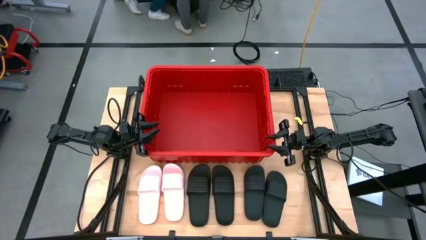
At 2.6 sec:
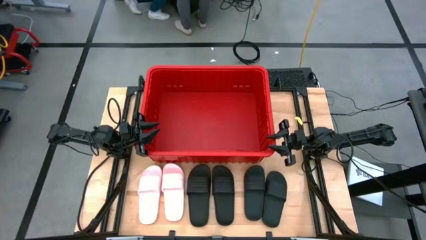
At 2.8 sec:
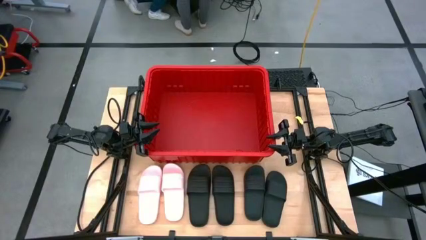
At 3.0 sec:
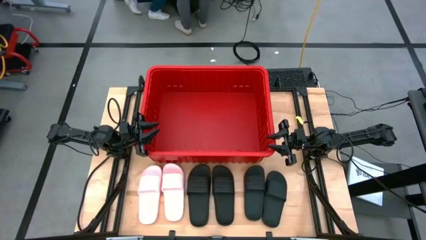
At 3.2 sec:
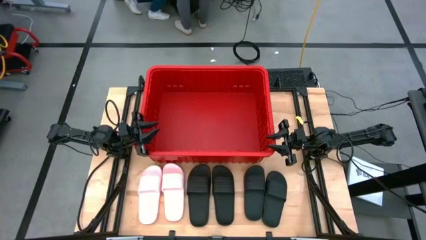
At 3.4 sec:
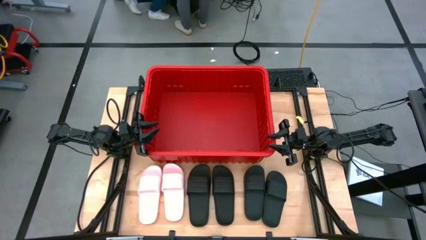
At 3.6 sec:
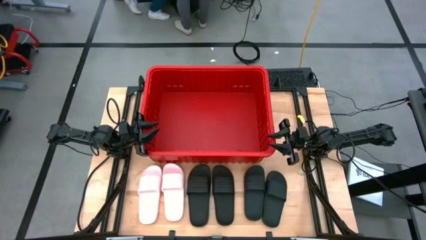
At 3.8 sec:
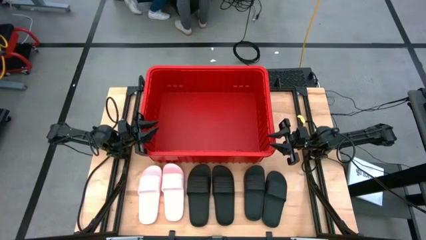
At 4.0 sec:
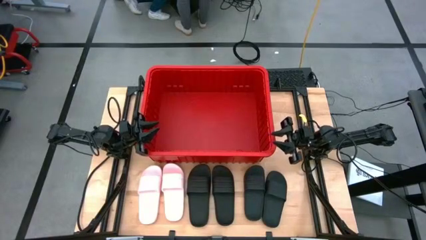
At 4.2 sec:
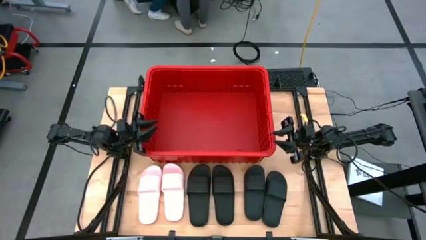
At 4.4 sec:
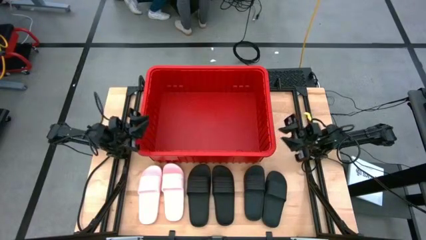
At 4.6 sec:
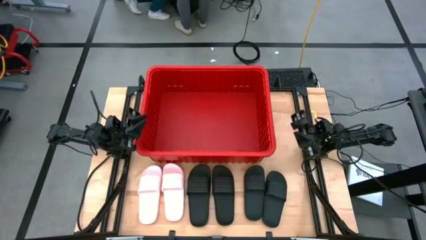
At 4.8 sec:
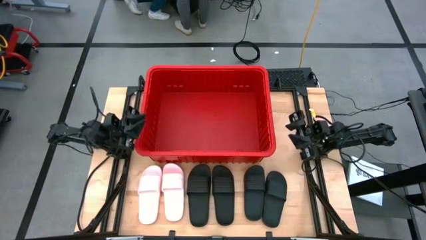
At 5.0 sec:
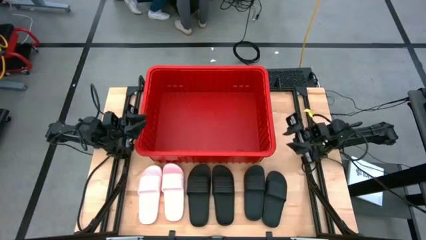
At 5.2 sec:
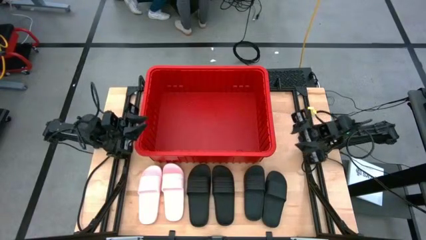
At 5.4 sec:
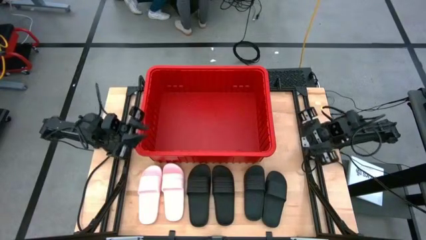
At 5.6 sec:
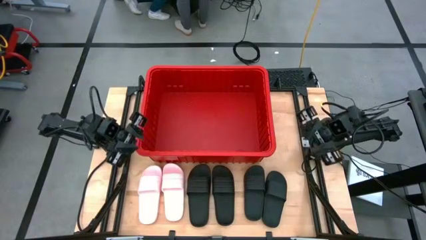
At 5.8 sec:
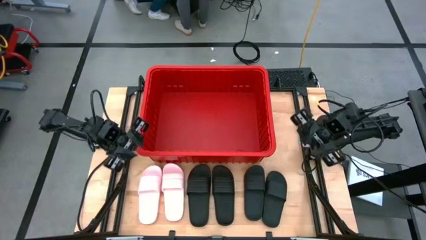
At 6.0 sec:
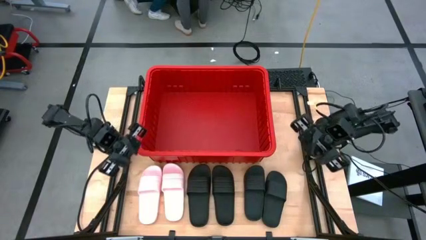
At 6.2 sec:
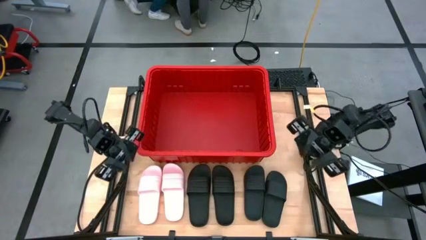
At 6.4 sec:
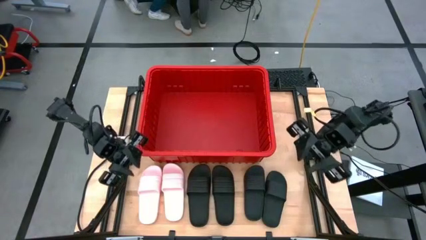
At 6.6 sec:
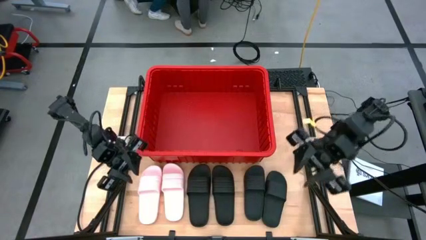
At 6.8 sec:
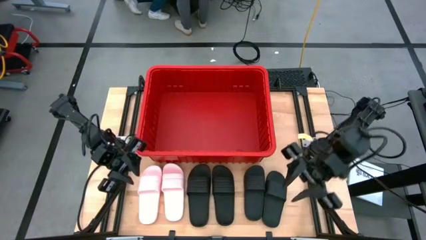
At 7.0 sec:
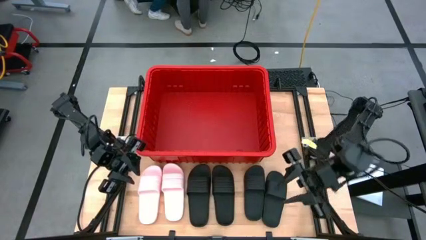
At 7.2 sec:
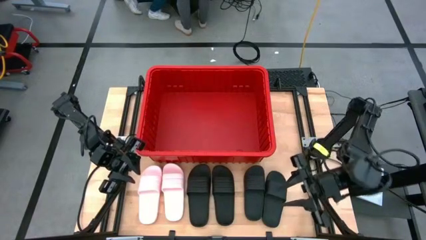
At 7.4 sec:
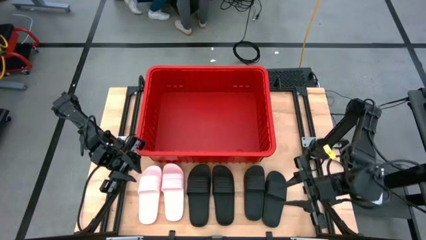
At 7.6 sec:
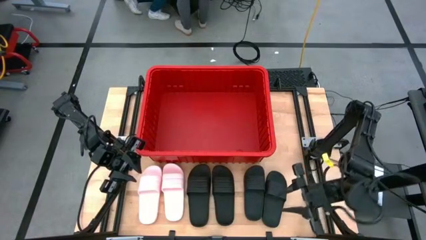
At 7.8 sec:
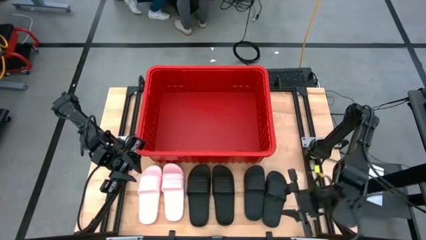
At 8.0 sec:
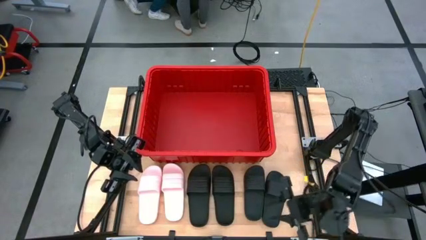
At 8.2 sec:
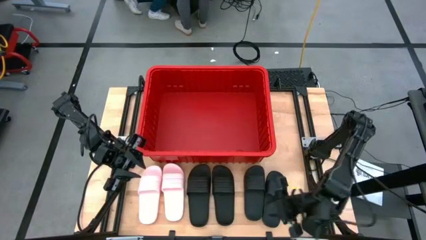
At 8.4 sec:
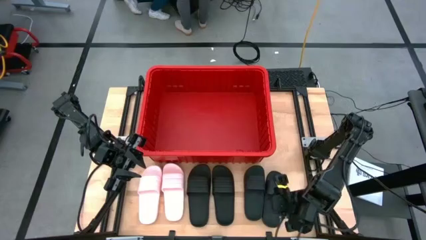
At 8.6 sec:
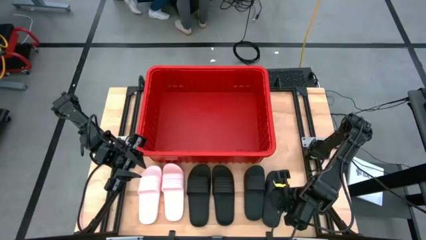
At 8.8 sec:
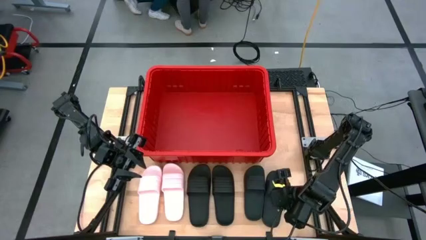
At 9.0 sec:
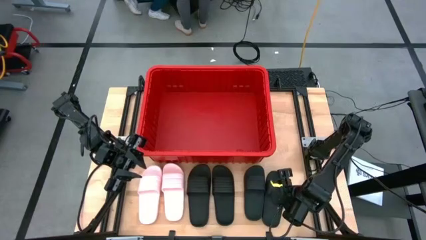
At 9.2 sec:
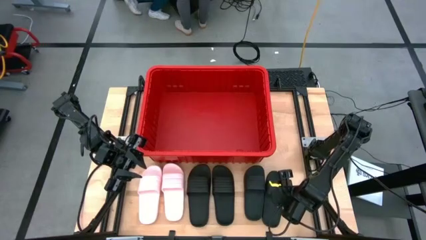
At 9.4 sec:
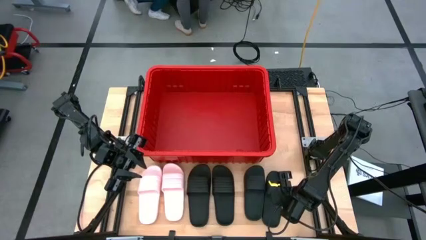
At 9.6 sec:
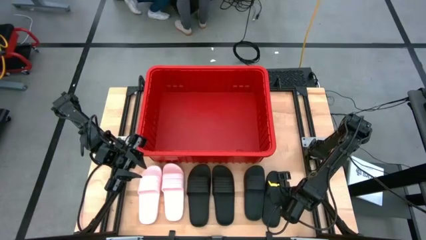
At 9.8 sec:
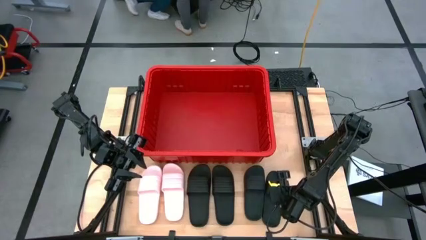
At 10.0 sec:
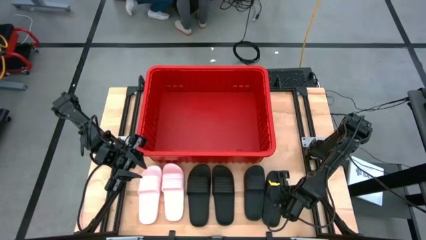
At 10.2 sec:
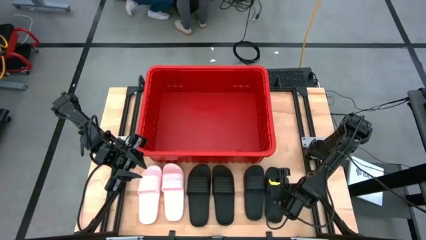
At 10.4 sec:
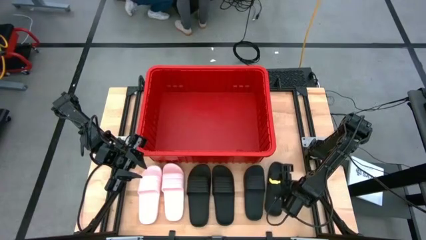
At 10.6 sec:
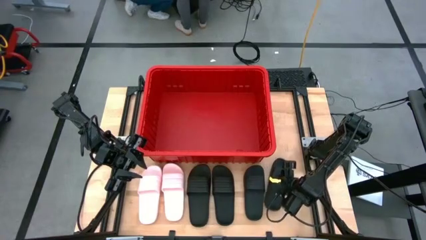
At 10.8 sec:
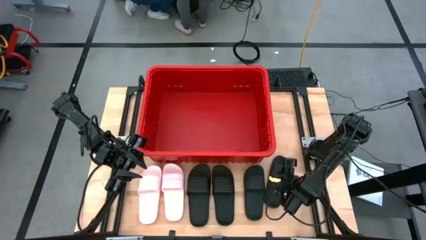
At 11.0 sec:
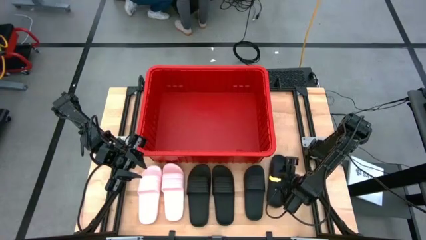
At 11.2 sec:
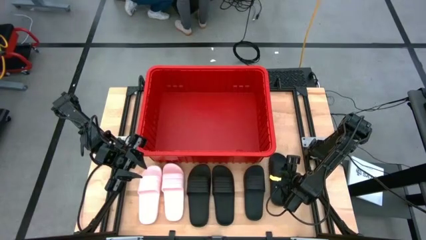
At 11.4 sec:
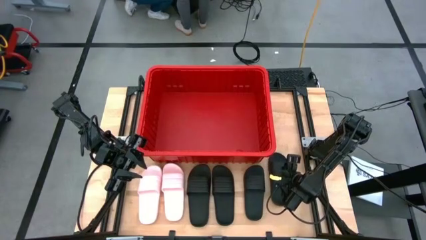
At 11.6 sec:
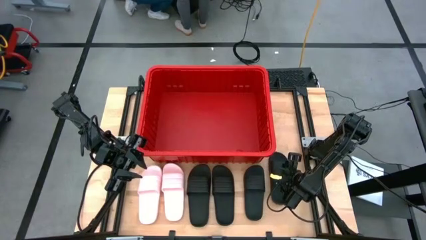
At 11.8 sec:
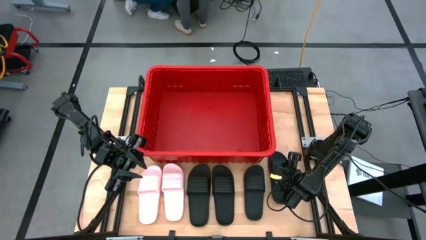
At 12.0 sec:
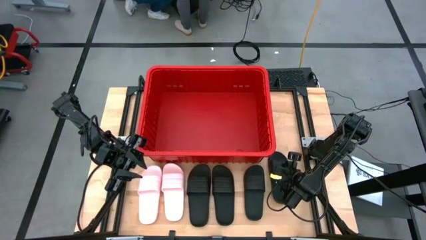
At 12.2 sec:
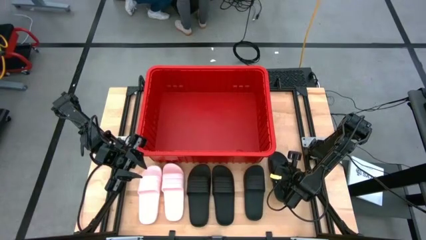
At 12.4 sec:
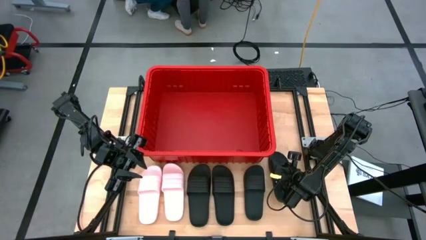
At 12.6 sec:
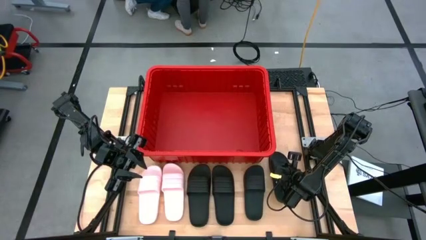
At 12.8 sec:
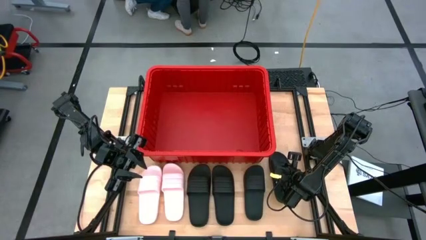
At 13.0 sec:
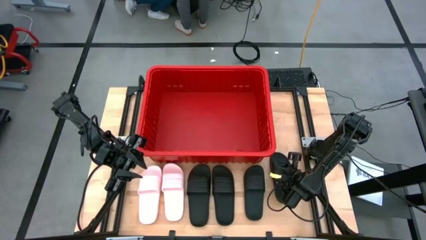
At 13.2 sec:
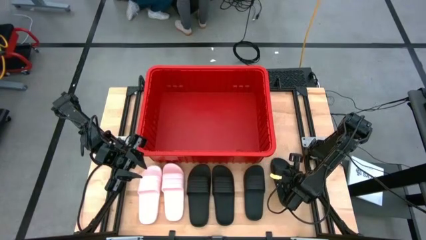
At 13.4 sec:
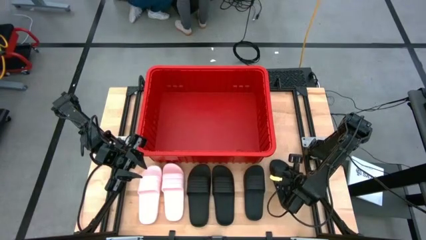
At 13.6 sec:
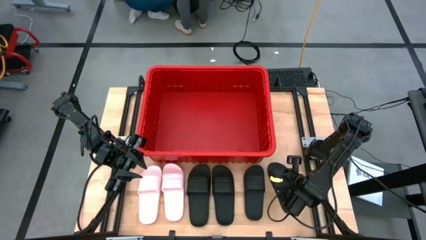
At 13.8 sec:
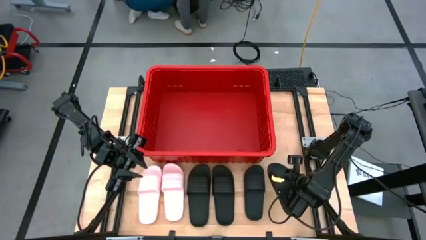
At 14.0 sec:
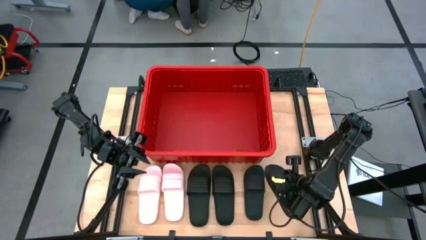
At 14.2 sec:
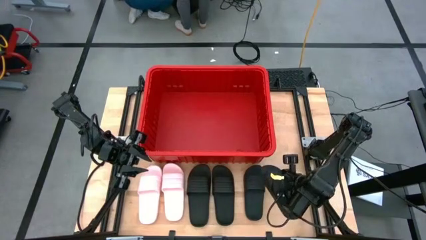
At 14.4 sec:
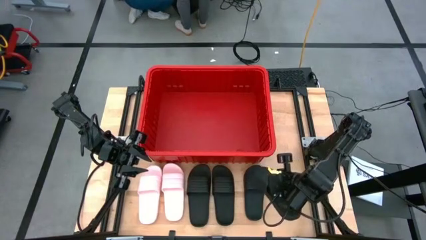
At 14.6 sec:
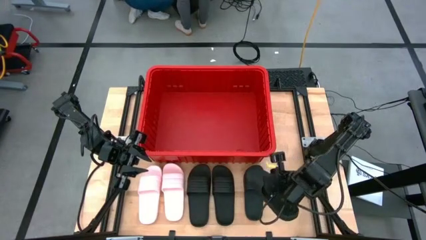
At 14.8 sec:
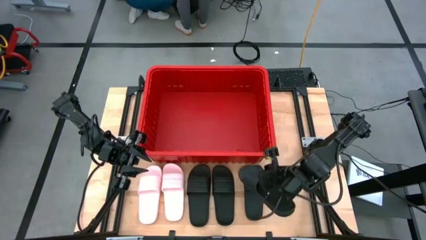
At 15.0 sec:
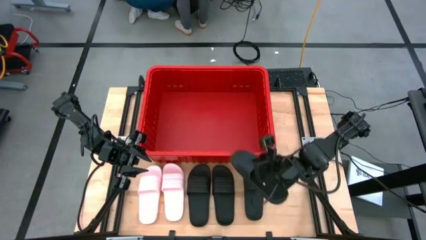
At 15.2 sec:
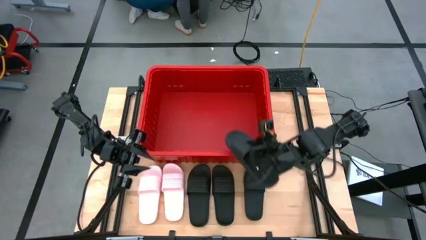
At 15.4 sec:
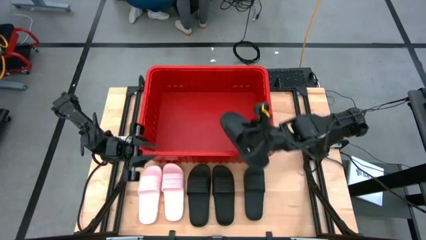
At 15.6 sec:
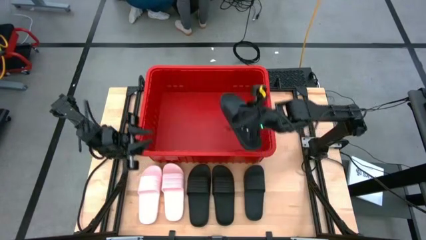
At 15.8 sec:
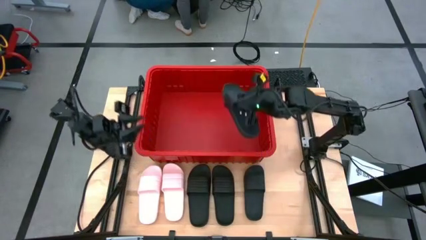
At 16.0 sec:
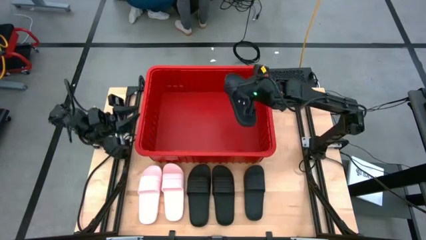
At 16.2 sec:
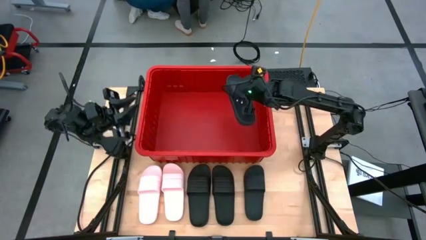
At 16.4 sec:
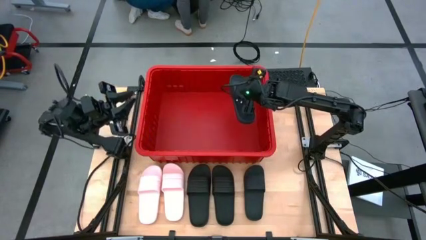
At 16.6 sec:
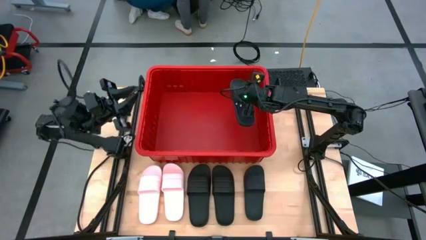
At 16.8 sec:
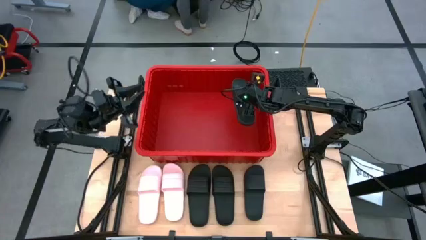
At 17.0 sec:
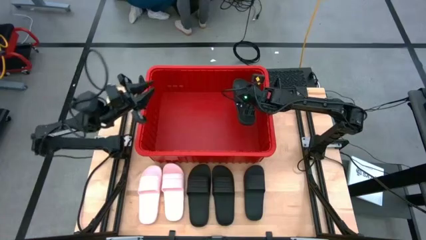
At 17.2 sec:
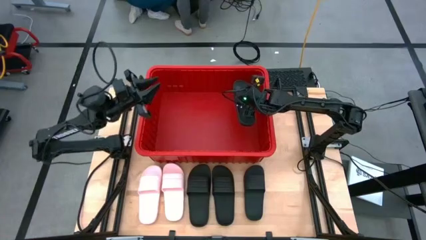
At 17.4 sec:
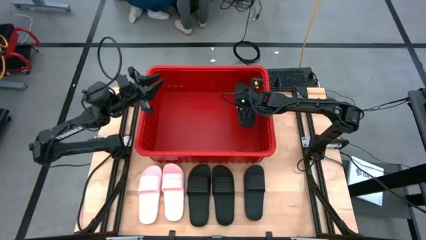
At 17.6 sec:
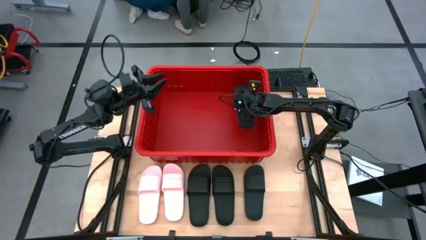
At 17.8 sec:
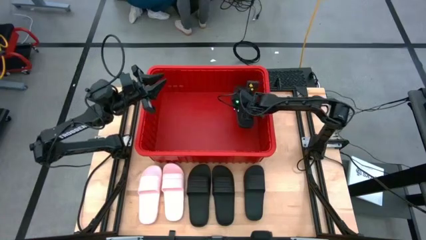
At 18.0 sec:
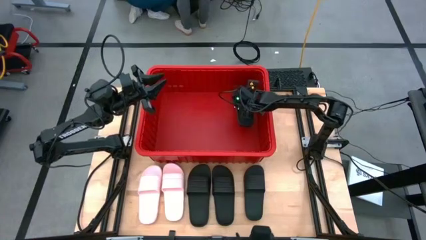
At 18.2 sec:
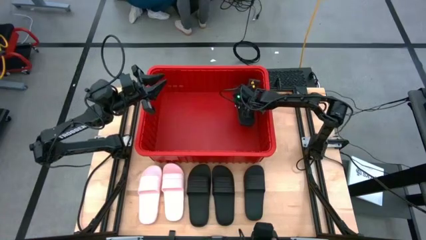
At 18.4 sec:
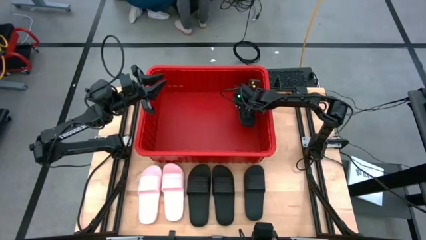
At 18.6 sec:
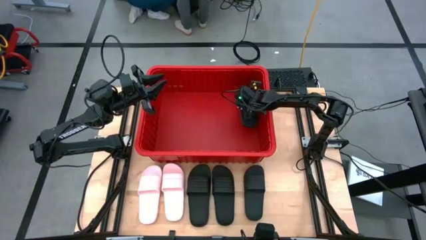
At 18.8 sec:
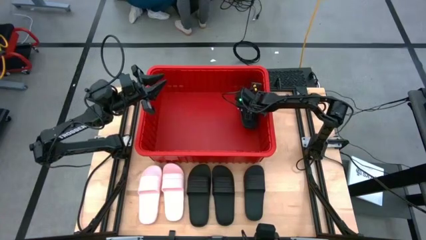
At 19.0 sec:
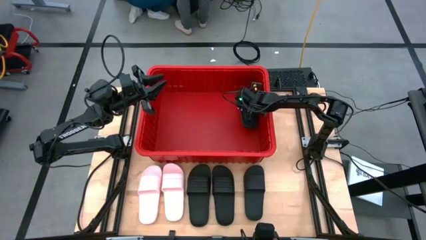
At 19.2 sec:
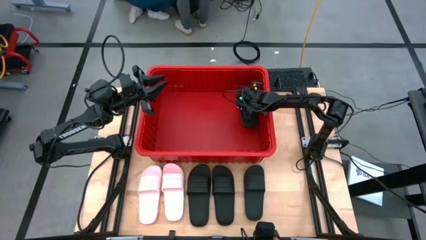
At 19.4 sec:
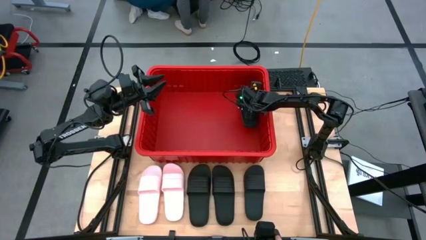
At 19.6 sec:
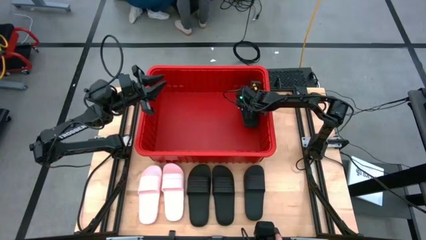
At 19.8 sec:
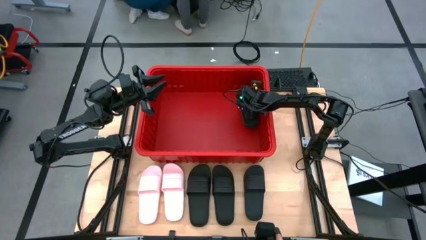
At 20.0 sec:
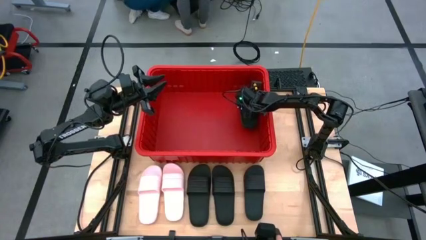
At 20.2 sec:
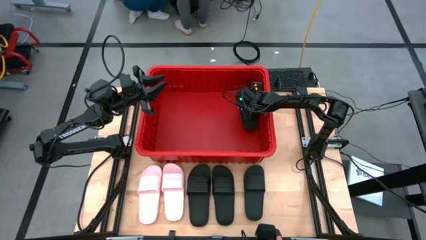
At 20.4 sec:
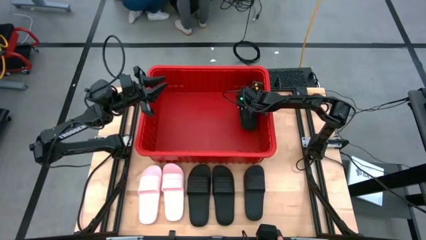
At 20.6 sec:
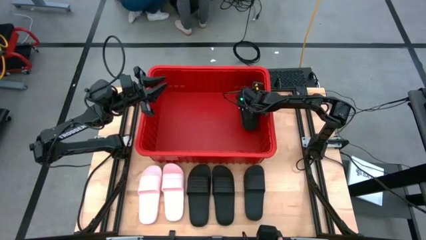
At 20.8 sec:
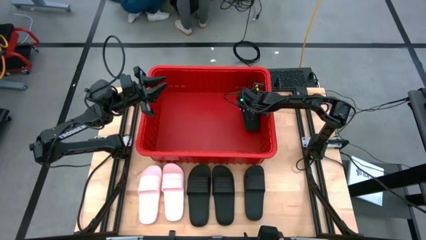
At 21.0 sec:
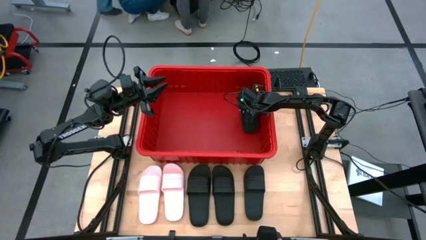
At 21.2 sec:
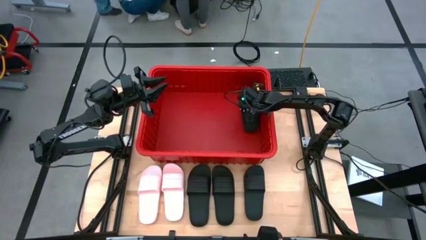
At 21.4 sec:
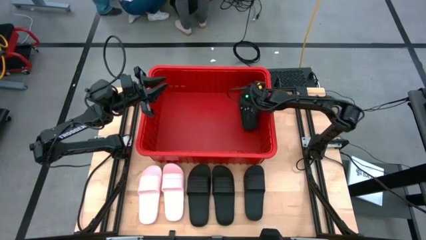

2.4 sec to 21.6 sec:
Task: Pick and place slides into bin
Put the black slide into the red bin
